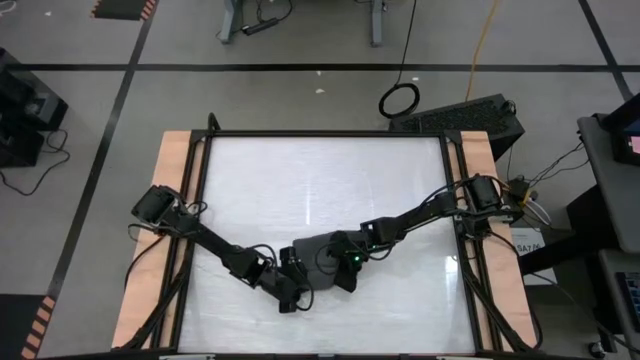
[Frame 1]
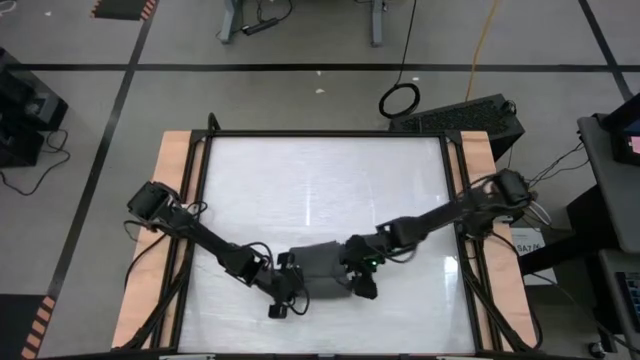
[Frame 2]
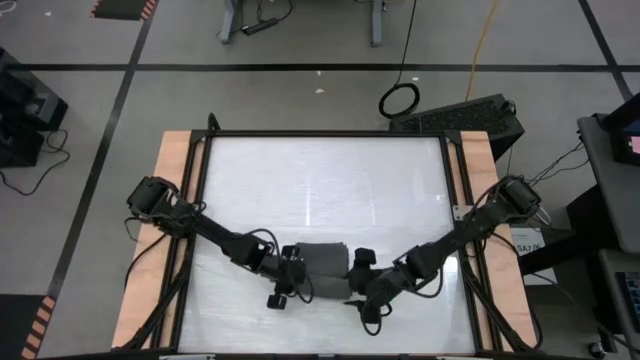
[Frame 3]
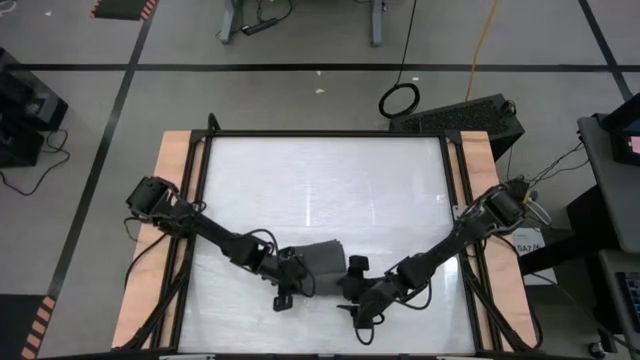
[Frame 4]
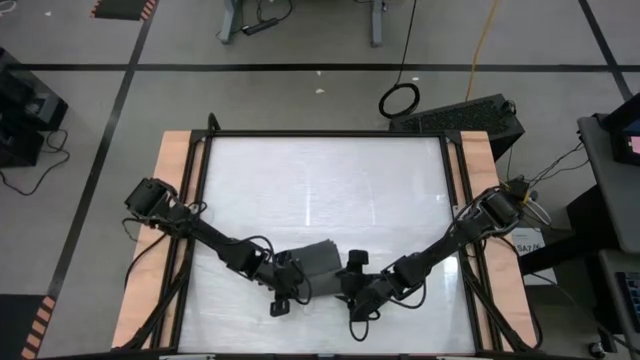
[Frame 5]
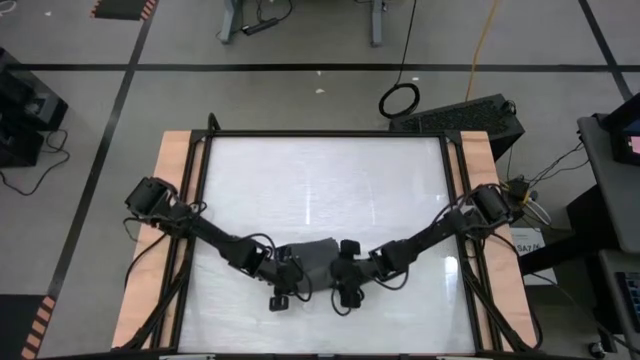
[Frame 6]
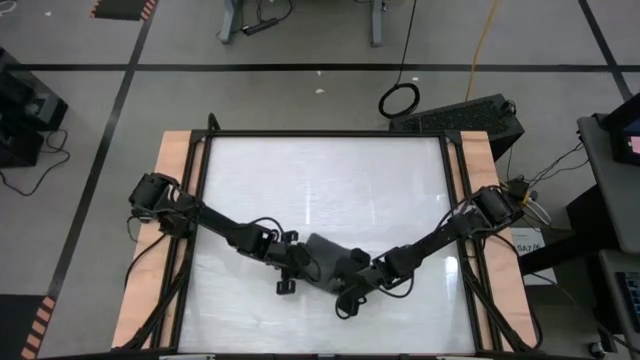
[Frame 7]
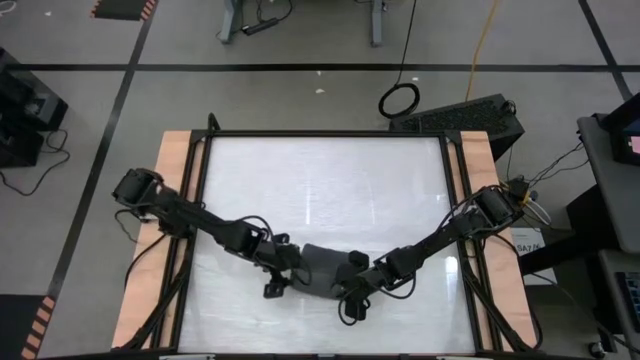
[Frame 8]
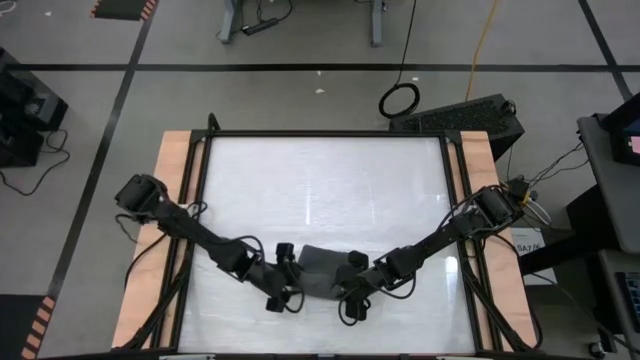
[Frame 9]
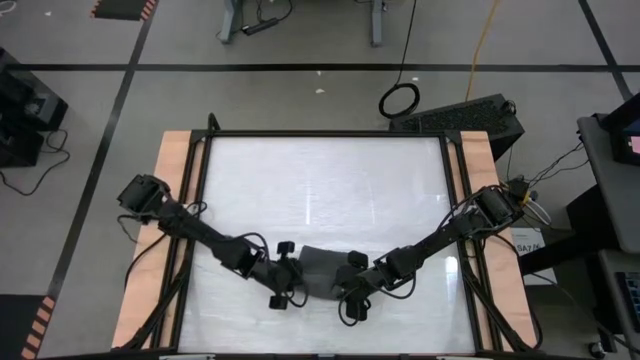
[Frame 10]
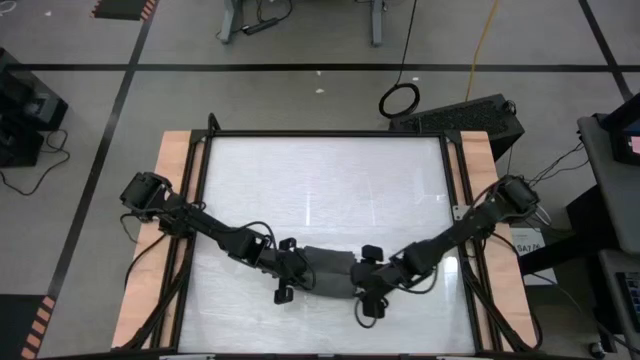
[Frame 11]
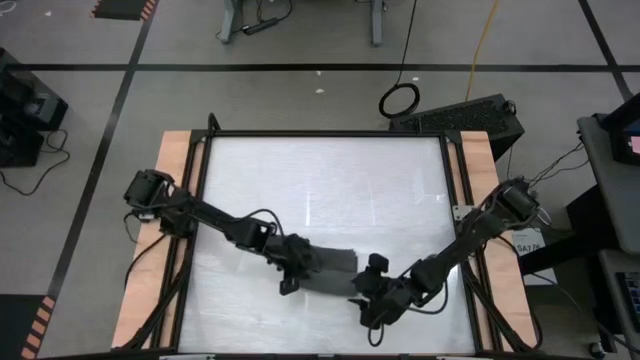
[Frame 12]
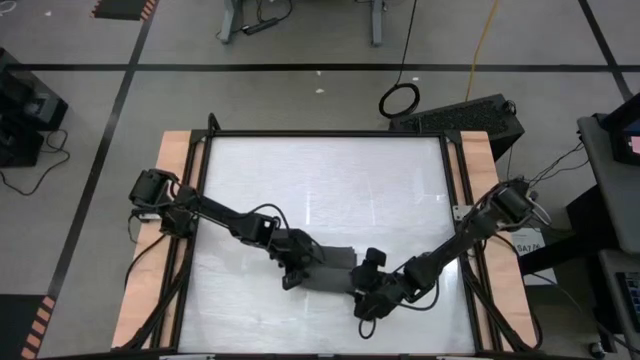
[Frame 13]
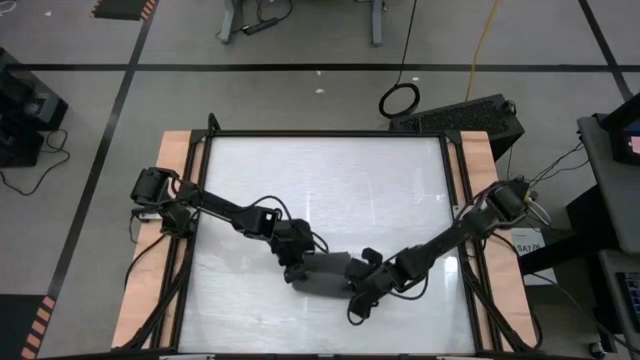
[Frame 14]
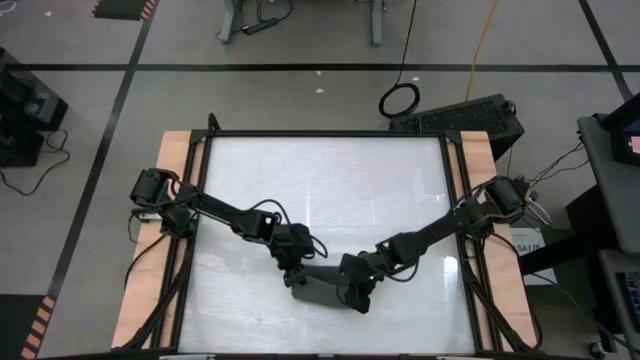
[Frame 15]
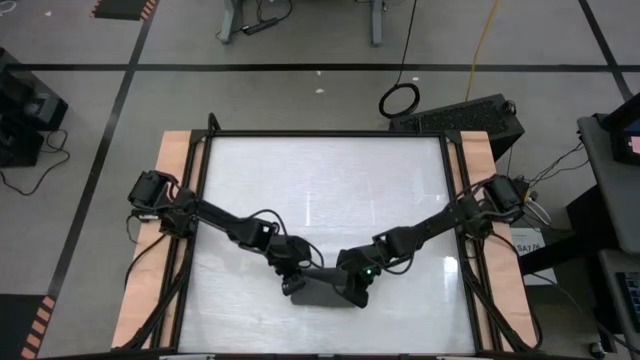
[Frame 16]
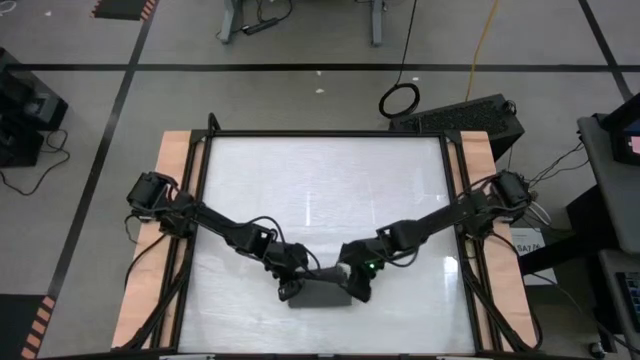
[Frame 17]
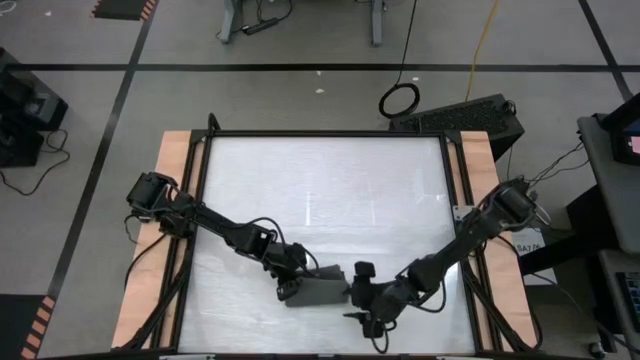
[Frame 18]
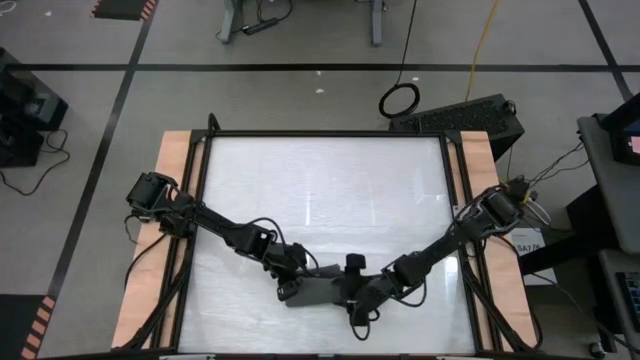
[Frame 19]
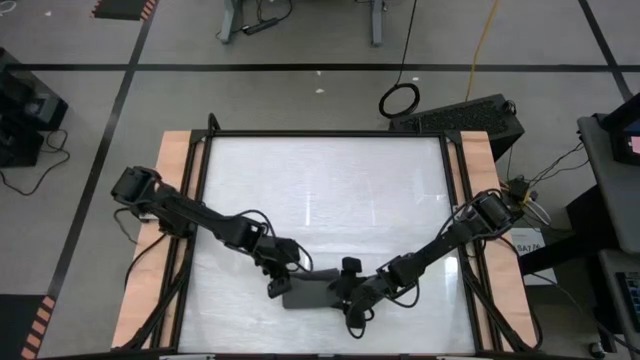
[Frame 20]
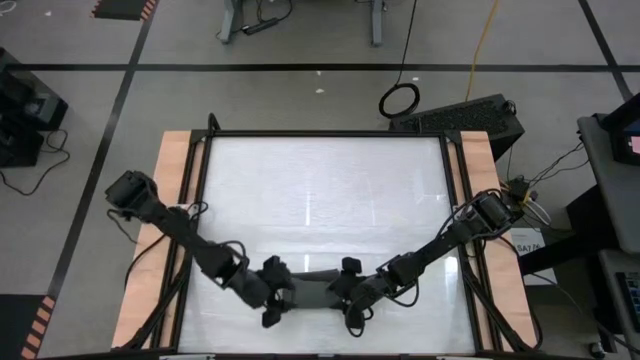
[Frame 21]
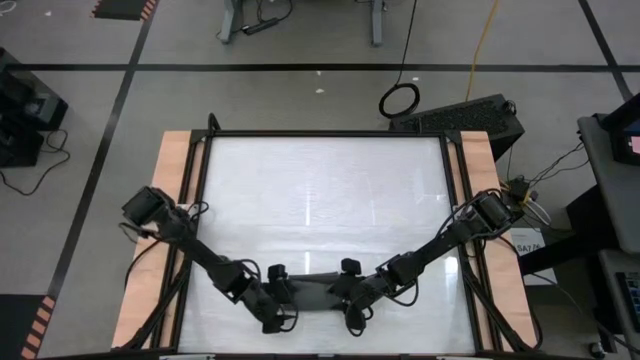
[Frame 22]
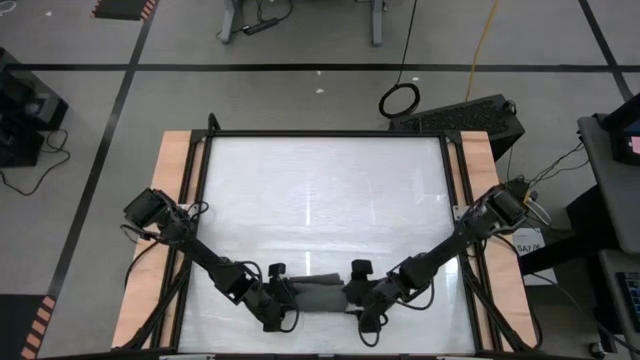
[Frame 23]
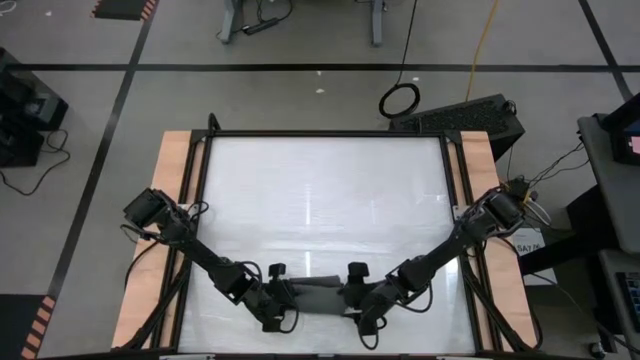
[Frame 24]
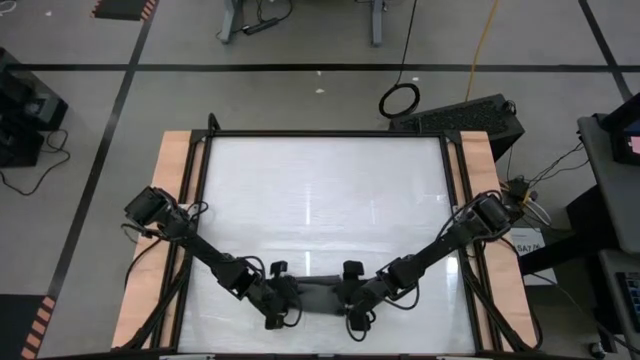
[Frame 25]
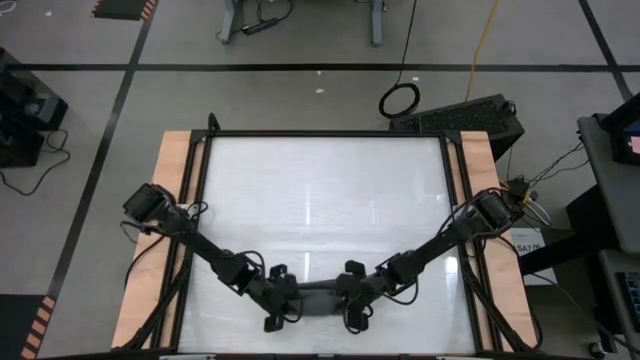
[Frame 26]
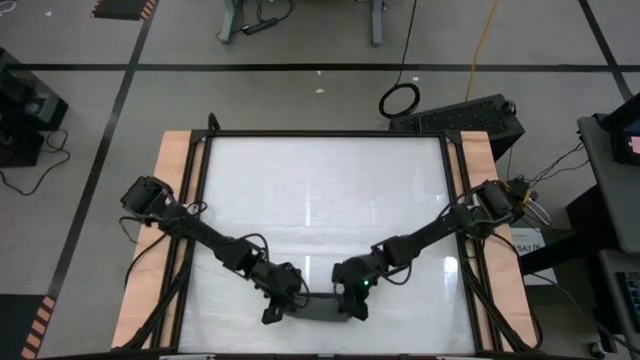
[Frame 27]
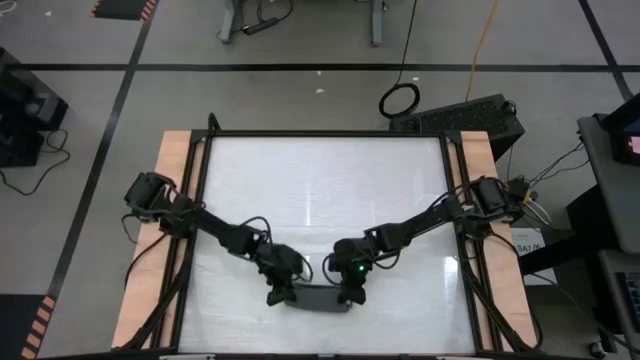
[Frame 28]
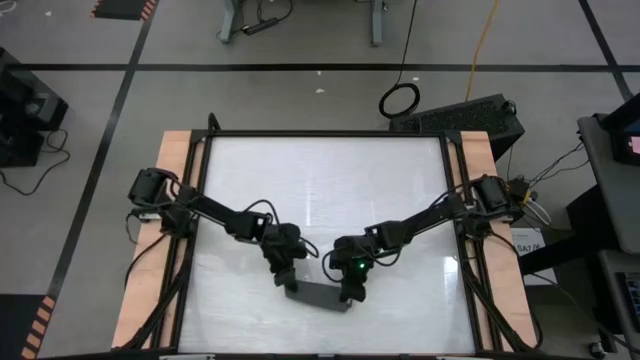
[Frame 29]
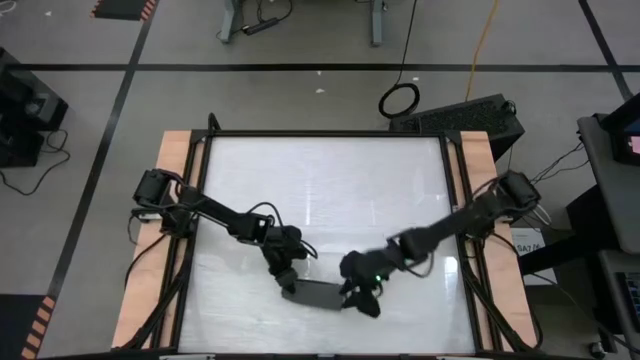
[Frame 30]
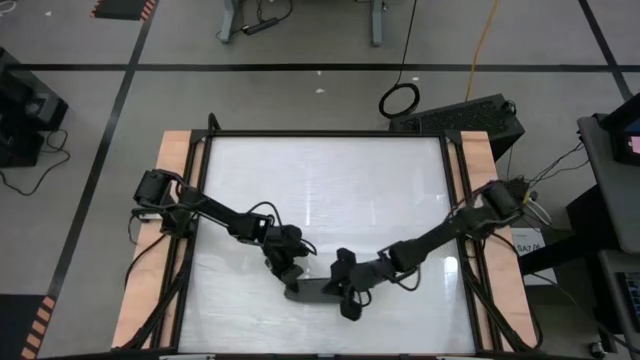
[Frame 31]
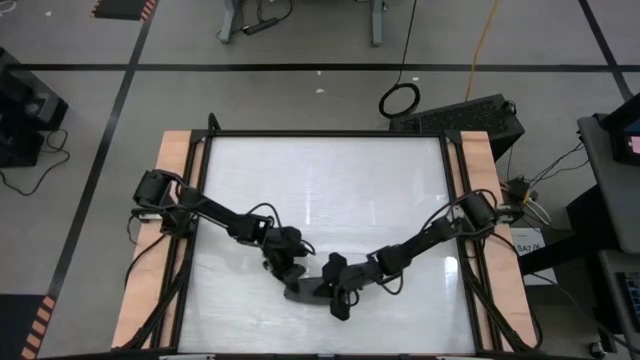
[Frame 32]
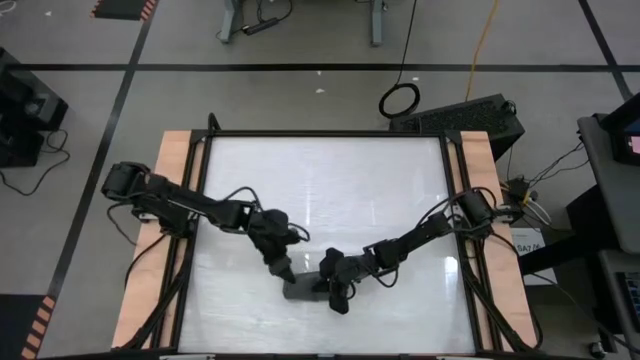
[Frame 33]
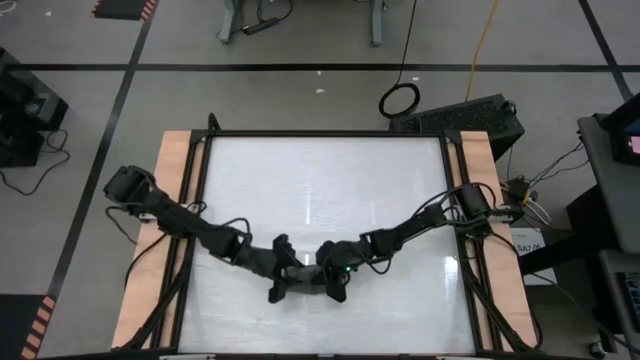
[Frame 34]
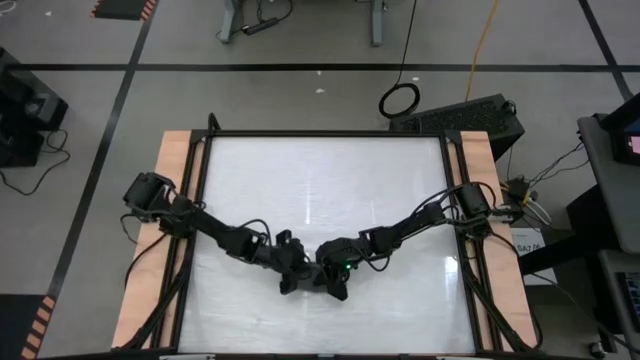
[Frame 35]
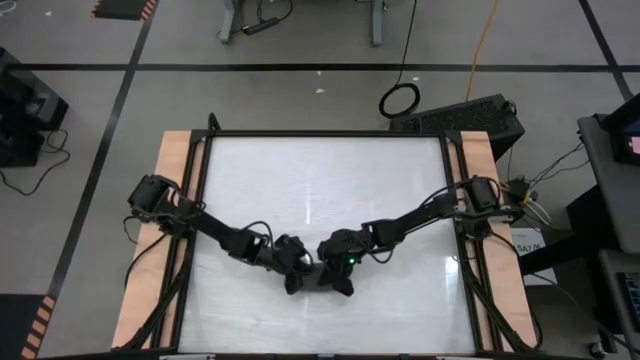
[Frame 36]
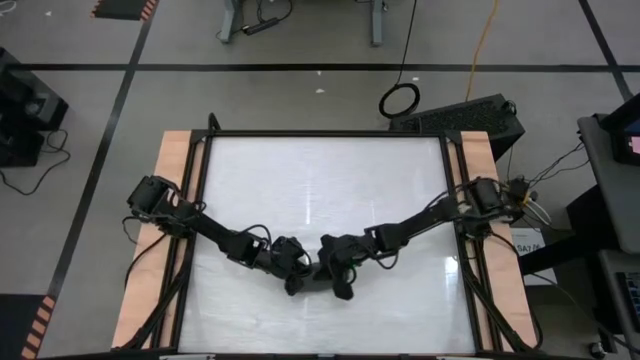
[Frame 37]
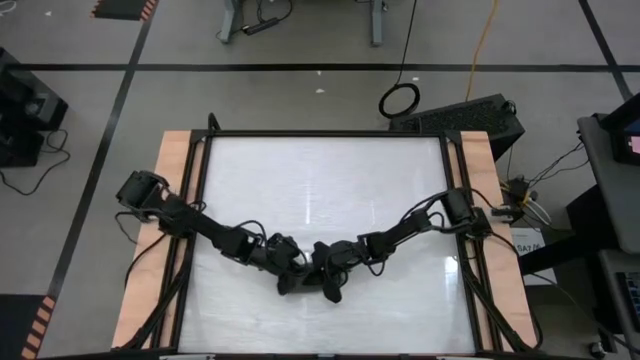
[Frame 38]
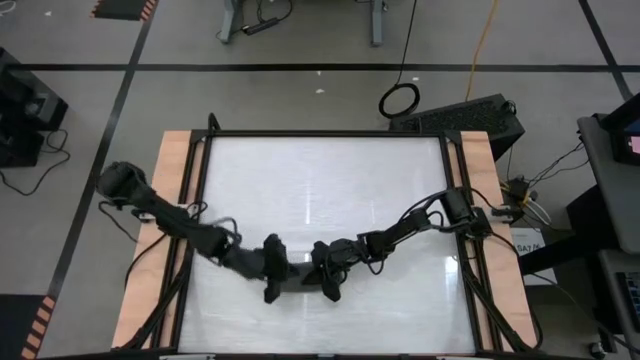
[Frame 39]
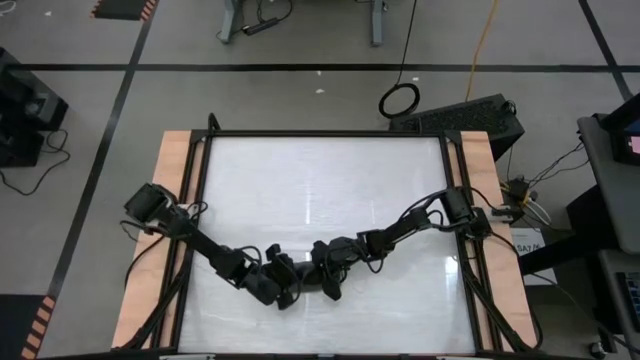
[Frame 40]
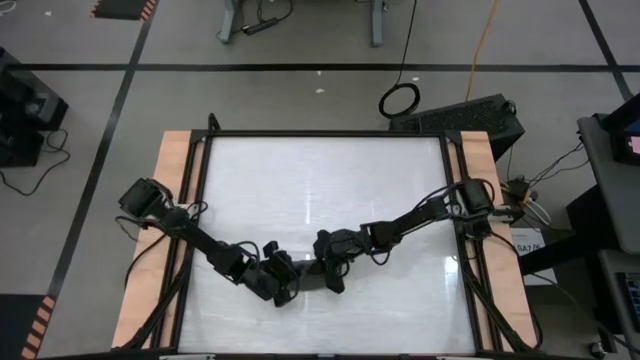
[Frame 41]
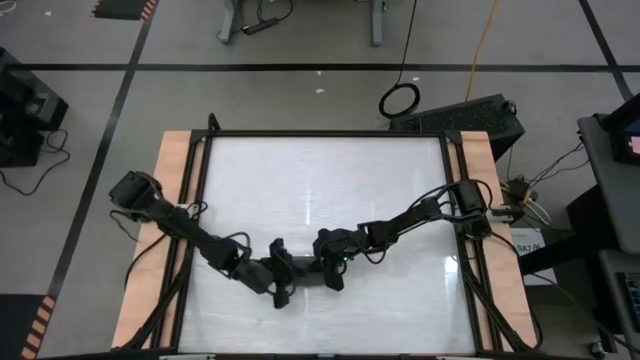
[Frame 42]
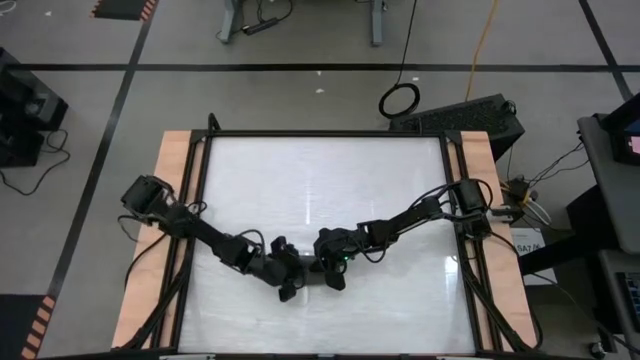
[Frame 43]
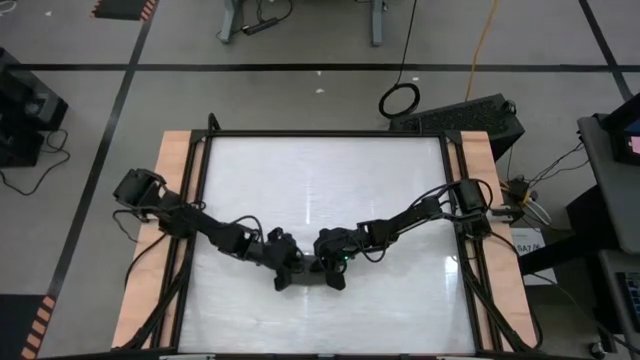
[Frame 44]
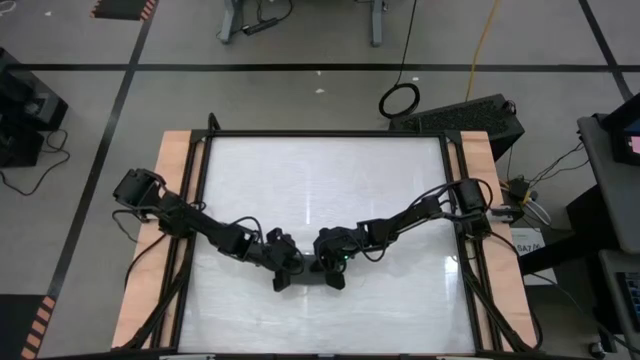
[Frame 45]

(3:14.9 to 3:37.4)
Task: Roll towel into tight, uniform cylinder
Roll the gray towel
